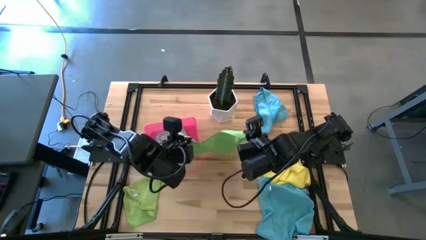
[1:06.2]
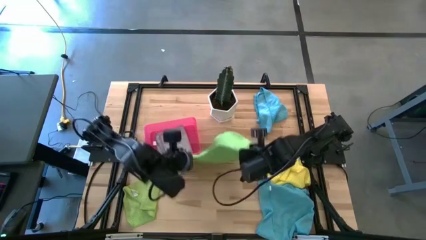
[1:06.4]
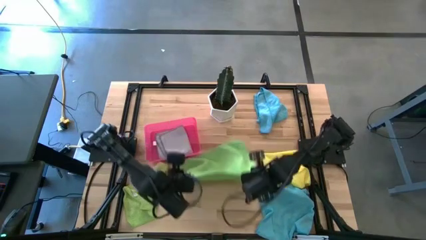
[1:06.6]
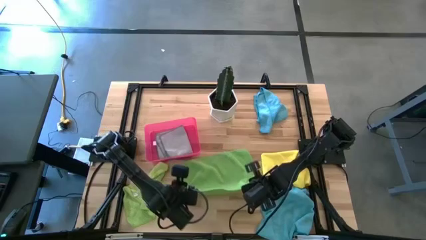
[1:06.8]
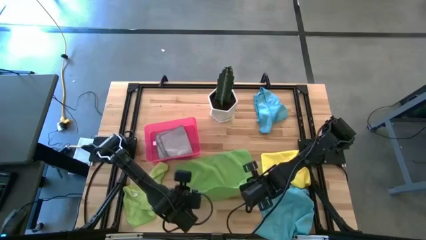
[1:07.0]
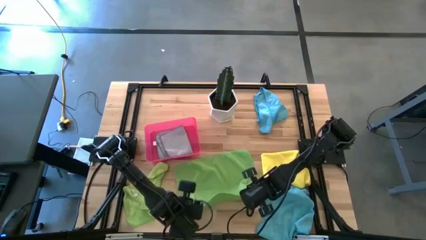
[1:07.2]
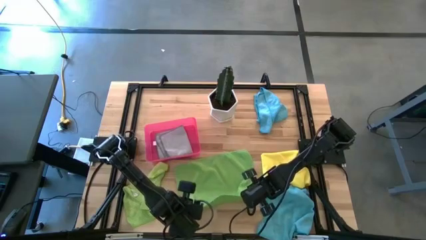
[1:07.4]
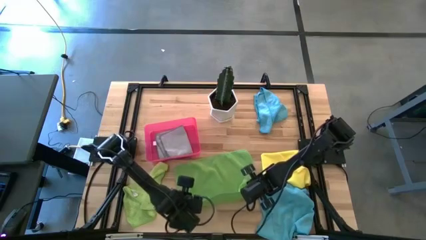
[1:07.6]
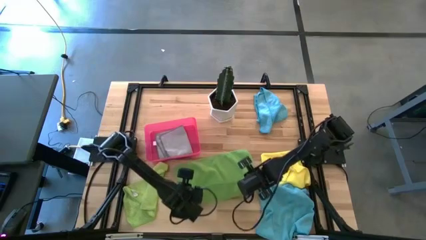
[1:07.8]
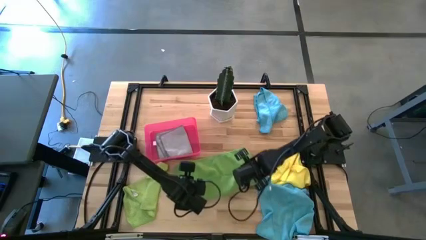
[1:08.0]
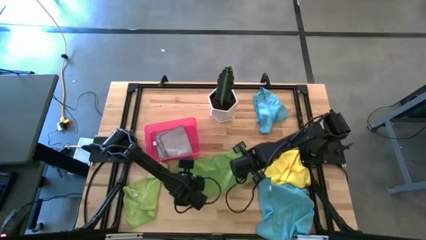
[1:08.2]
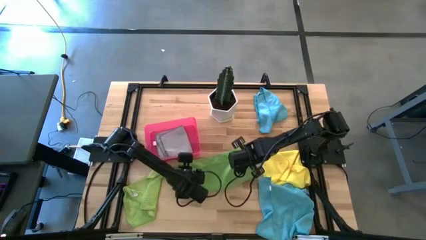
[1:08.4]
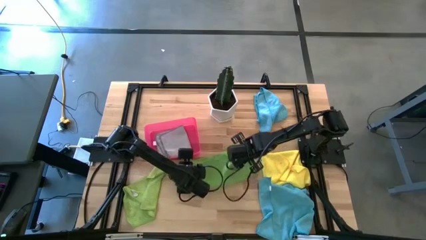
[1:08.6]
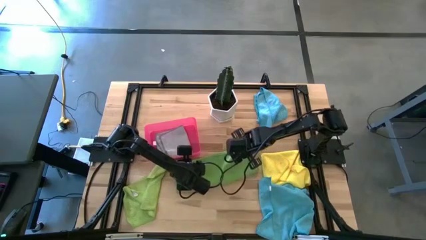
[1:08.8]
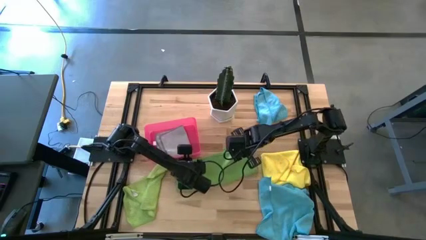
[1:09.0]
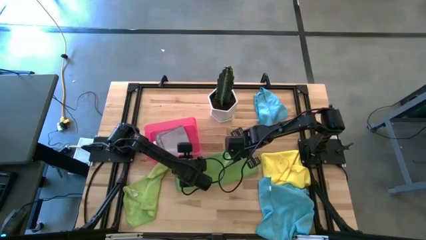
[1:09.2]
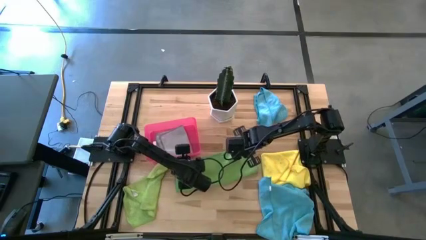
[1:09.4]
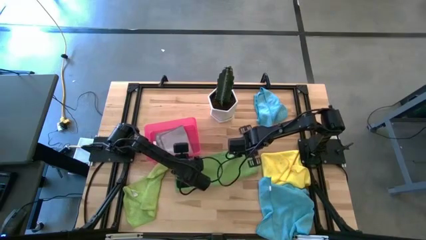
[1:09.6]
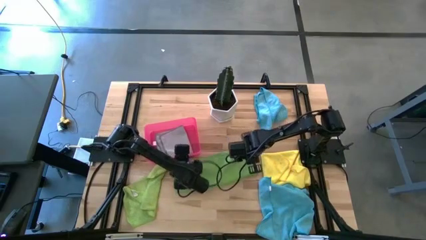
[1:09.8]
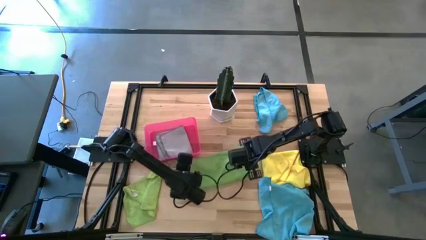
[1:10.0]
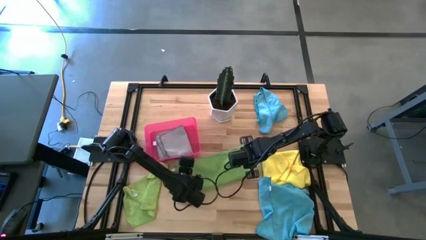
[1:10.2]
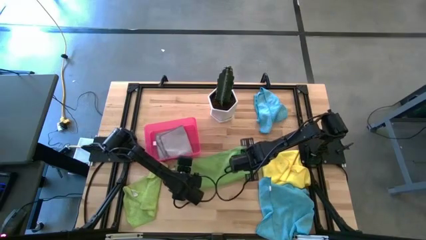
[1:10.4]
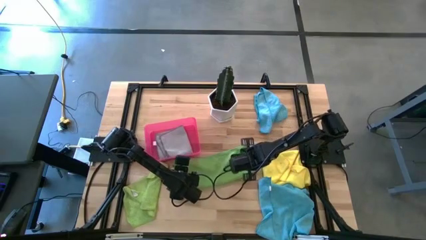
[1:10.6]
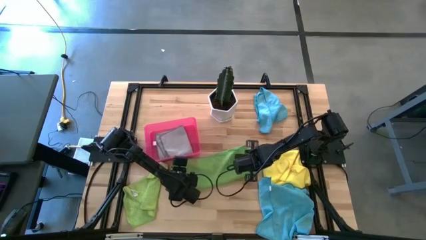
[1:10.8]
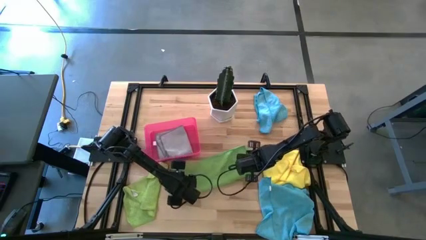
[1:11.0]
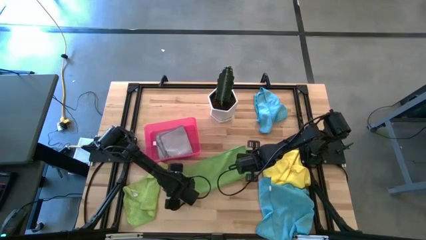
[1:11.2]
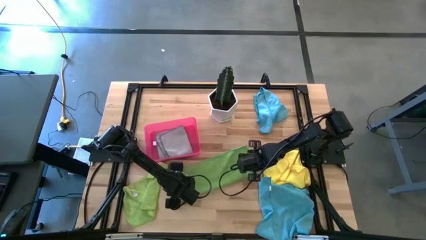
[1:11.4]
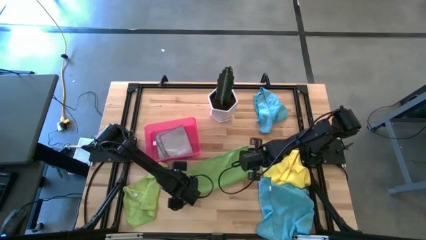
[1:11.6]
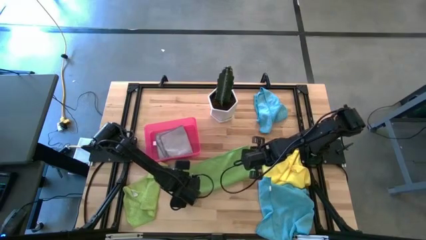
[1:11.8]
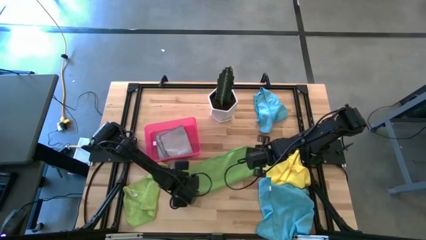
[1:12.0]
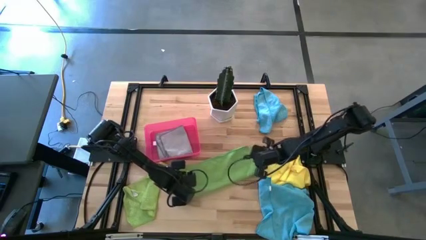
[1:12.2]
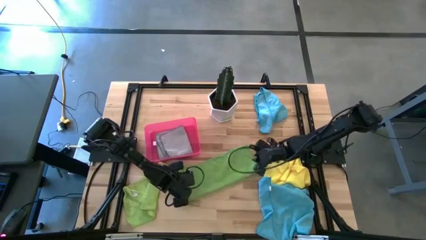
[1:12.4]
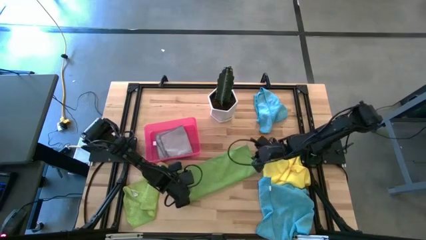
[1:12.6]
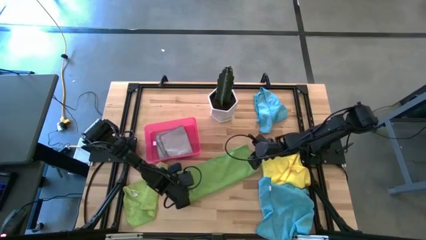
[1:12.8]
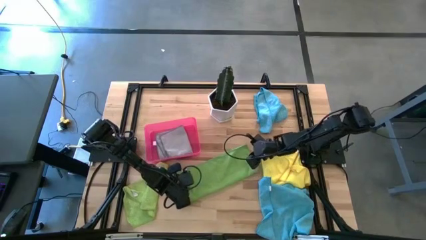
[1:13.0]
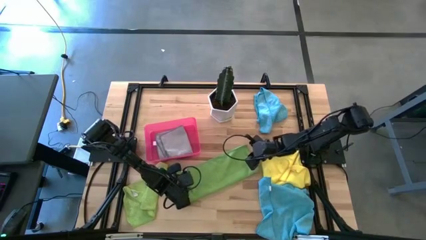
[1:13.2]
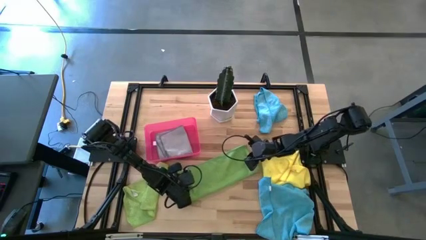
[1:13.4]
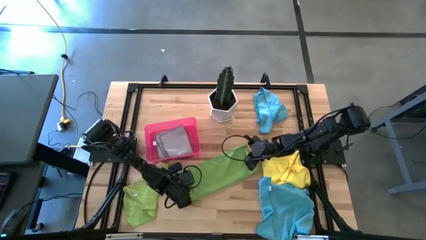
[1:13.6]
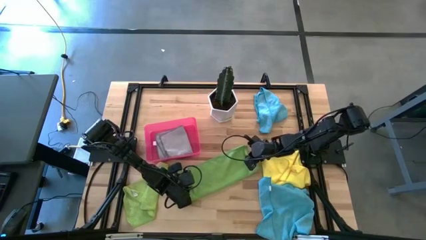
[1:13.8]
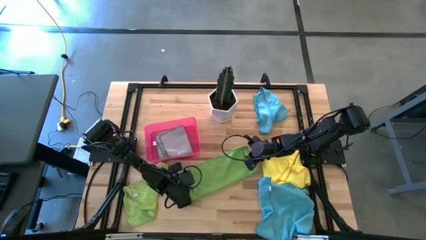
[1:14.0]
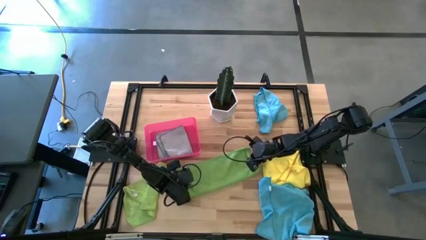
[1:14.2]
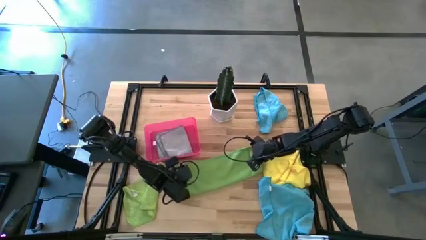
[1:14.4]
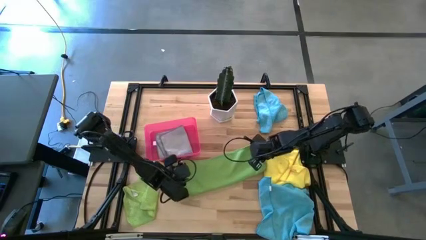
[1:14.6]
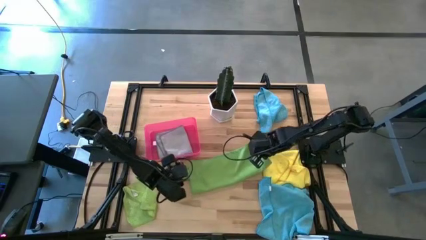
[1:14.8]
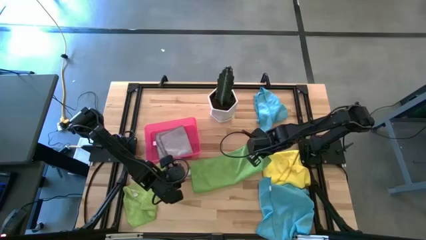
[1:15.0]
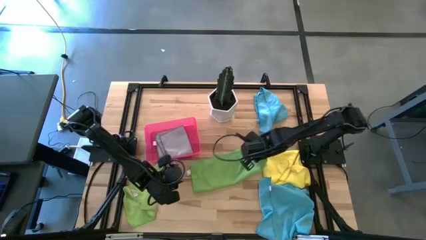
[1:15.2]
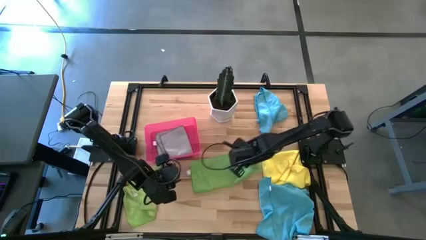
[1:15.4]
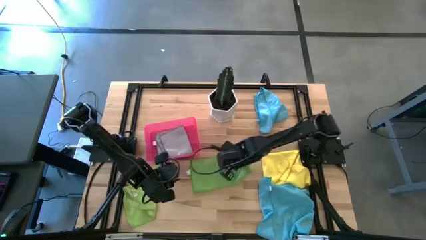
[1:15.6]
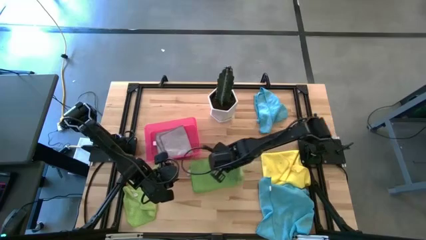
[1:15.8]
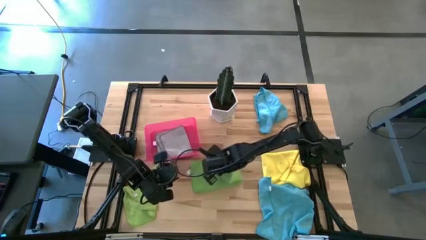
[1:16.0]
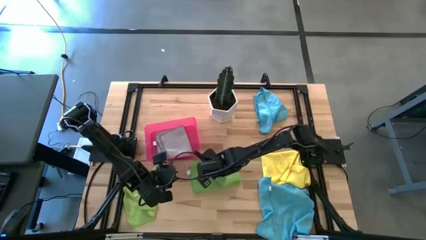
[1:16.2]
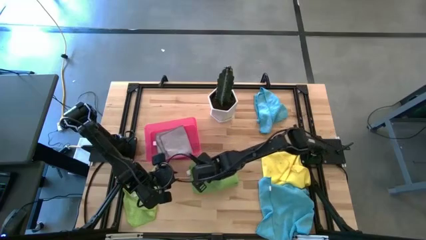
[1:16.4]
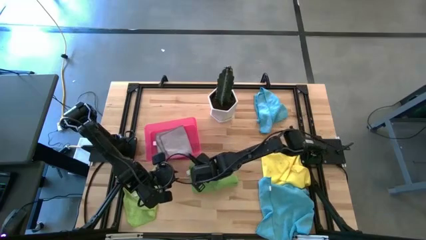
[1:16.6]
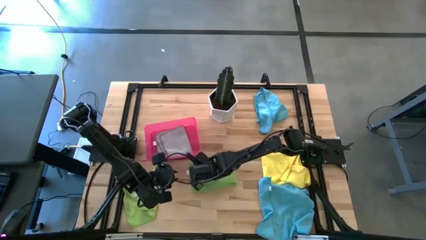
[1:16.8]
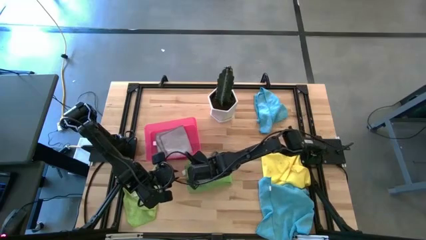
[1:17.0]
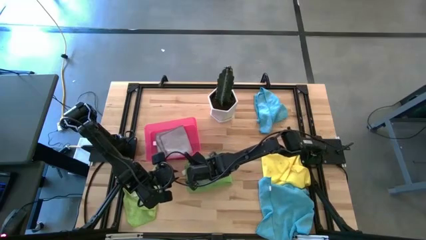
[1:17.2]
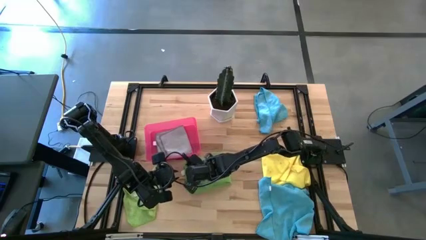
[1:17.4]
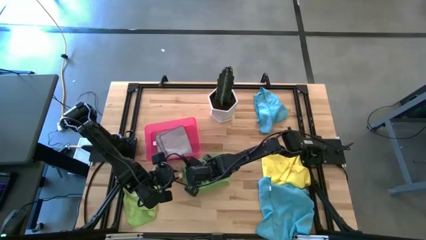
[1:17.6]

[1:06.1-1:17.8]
Task: Fold microfiber towels
Fold the green microfiber cloth

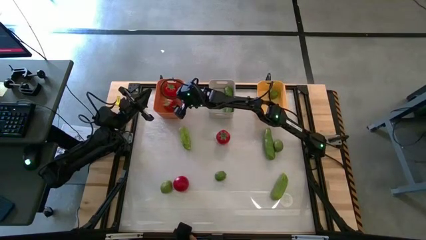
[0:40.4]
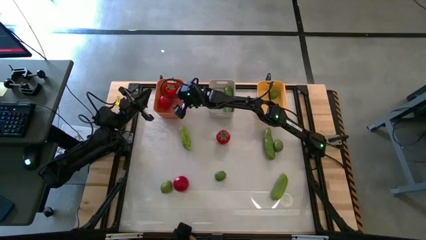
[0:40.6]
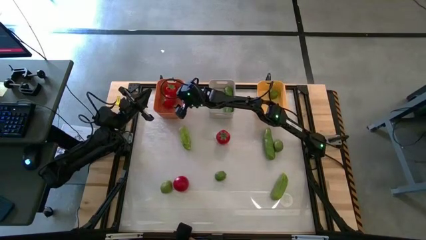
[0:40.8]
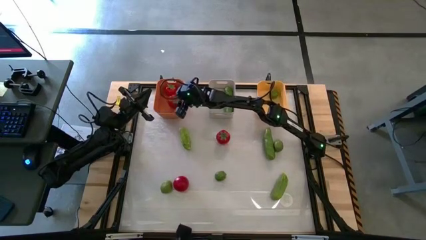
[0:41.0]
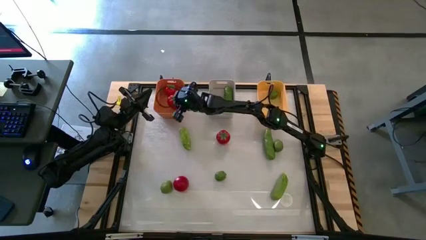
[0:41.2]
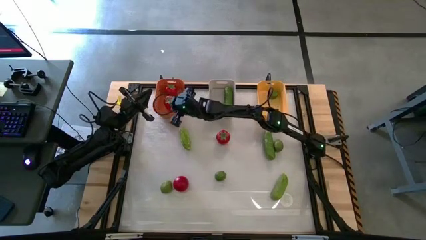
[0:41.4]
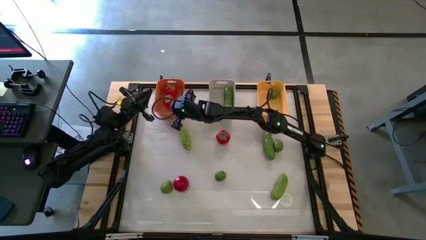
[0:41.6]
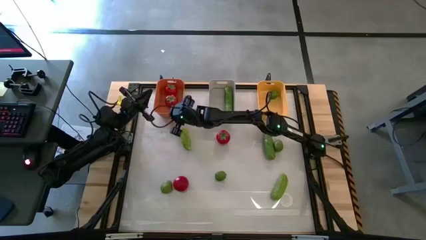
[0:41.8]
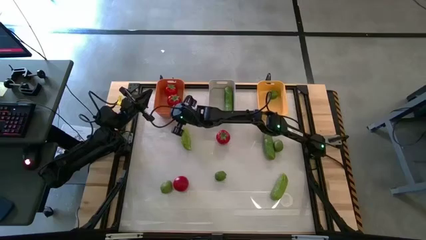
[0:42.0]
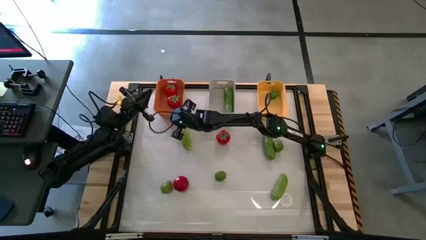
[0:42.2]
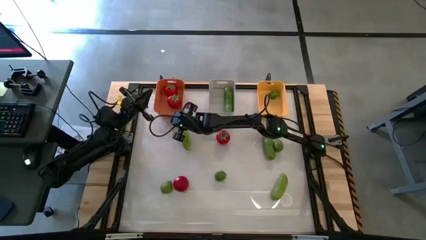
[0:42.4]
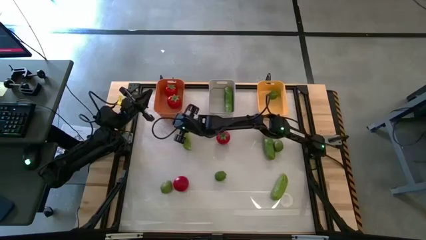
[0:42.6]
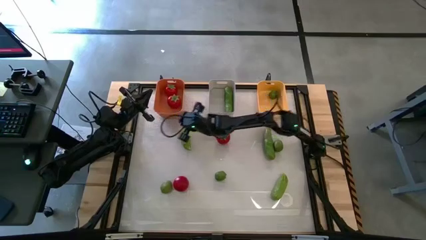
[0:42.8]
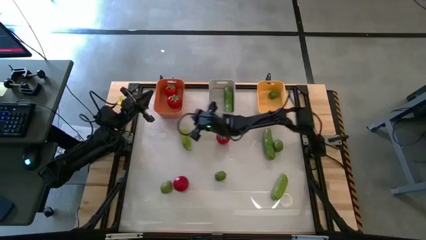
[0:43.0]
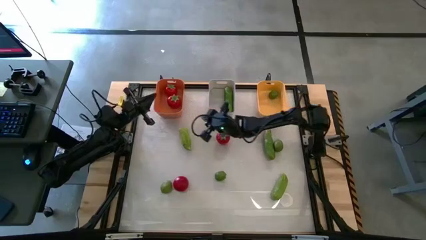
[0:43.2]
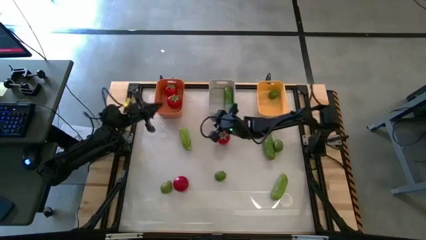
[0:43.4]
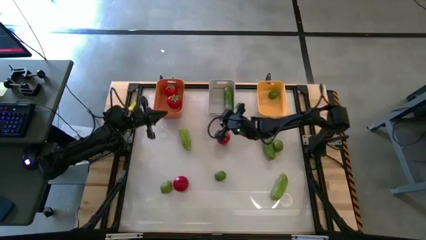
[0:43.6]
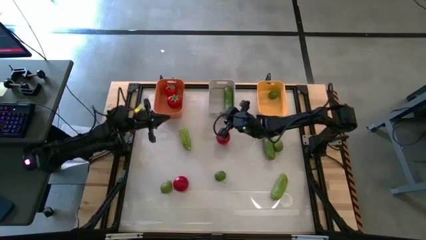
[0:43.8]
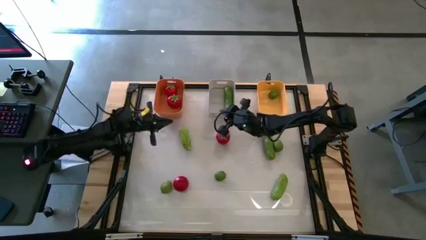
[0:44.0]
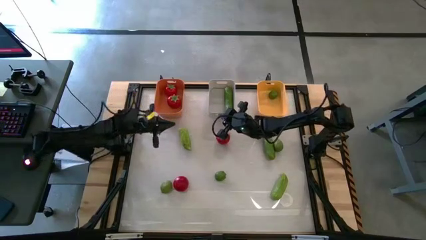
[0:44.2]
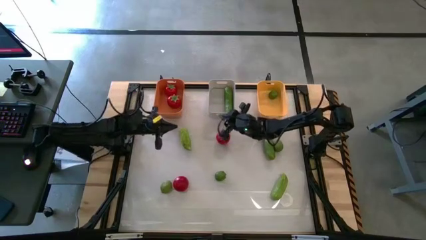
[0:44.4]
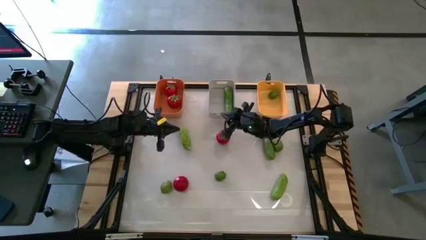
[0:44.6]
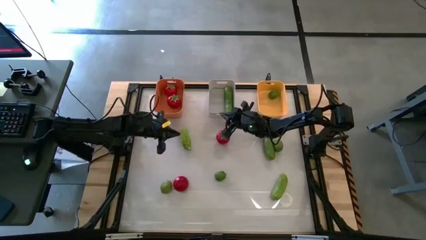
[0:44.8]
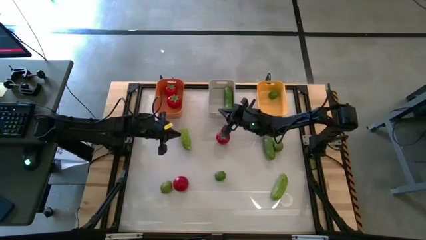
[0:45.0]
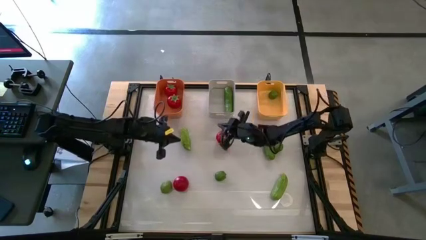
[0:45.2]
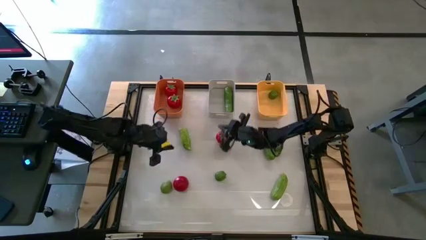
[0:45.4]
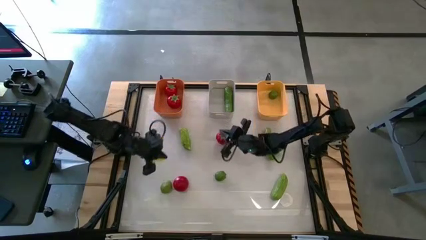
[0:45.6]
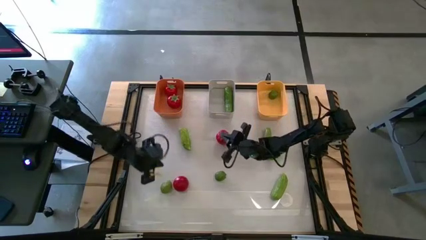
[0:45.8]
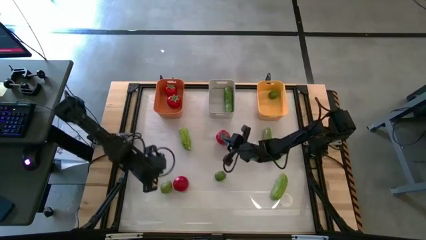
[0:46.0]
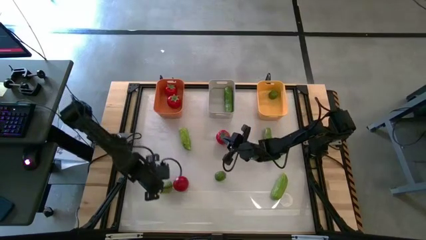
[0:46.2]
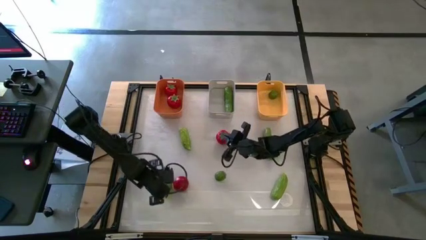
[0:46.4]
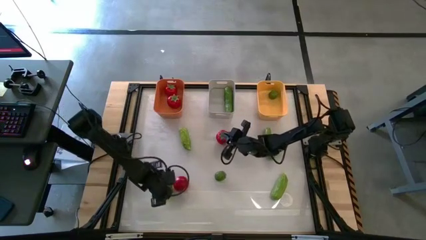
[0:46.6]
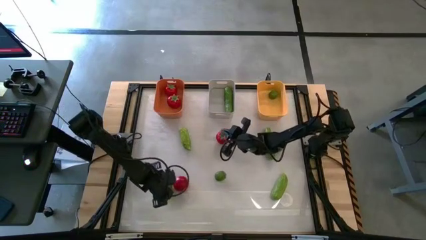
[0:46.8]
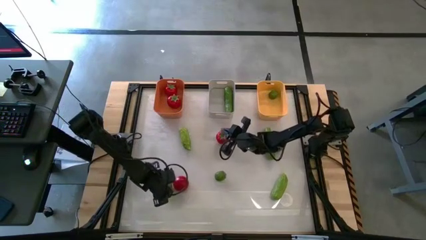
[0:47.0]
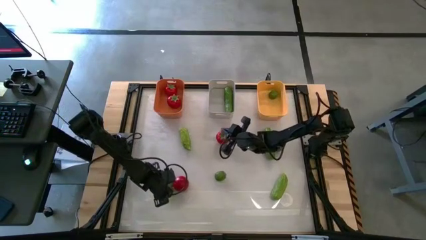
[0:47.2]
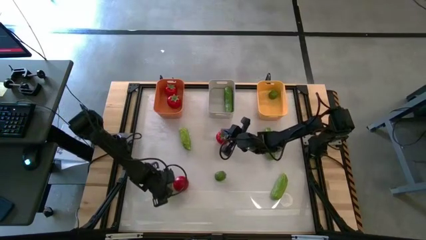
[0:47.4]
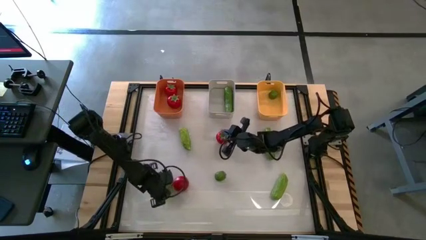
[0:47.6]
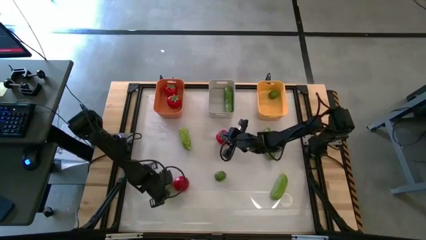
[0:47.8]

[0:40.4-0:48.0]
Task: Sort produce into baskets
Put the bottom left lime into the yellow bin
